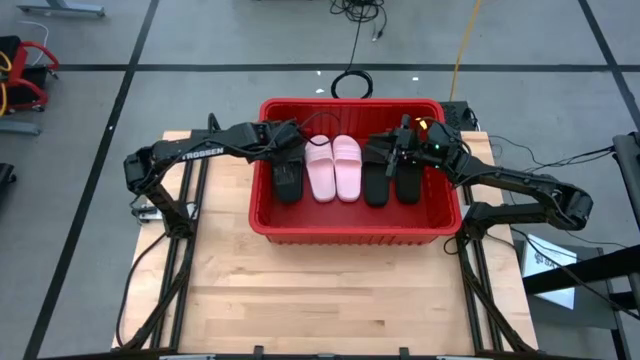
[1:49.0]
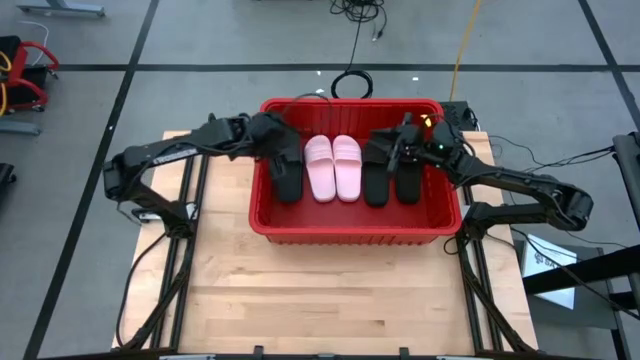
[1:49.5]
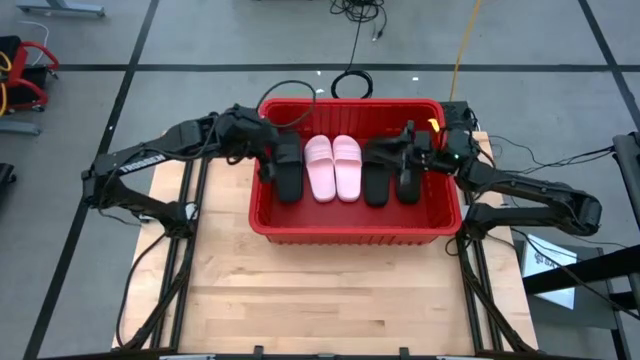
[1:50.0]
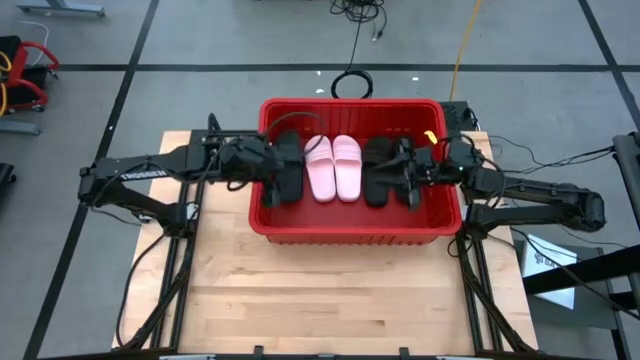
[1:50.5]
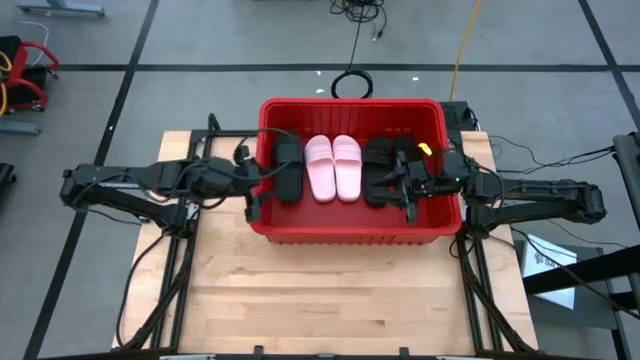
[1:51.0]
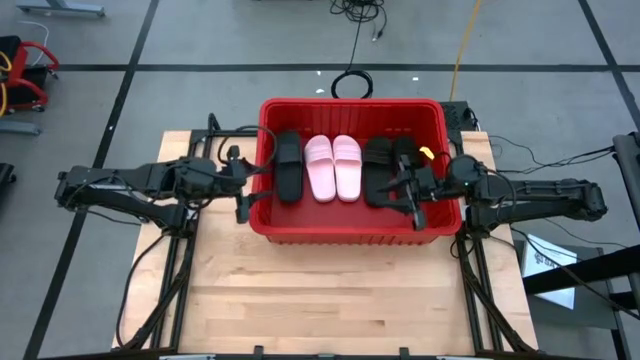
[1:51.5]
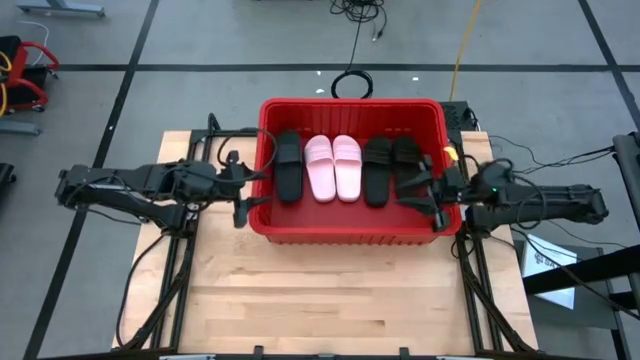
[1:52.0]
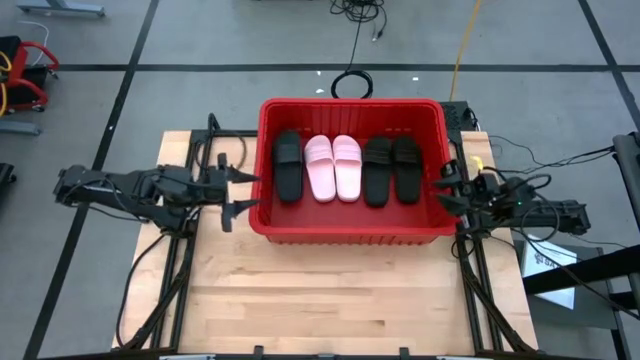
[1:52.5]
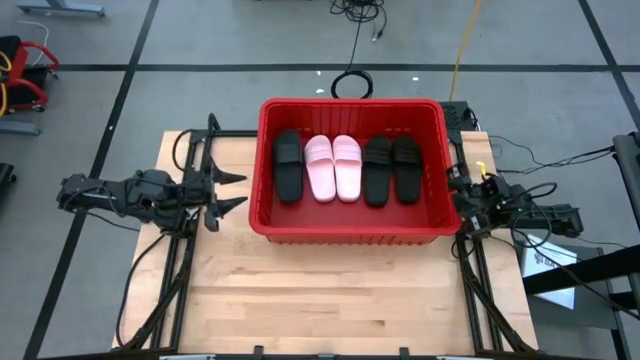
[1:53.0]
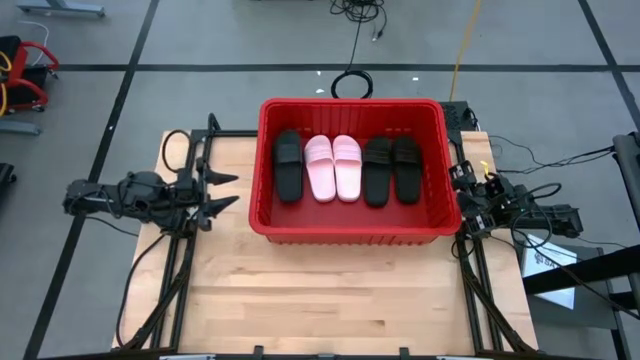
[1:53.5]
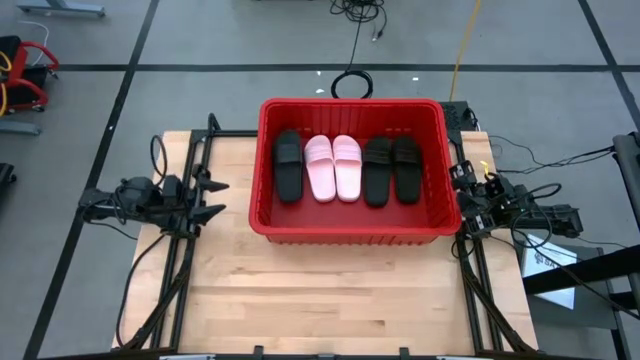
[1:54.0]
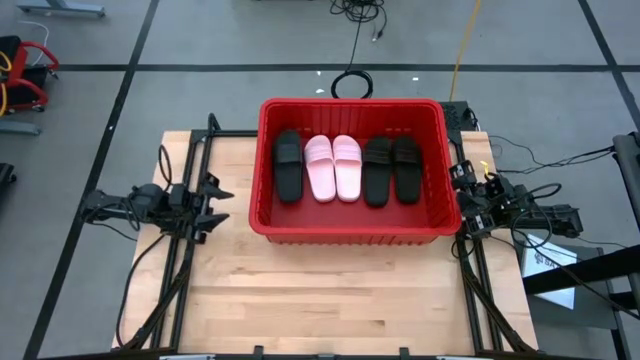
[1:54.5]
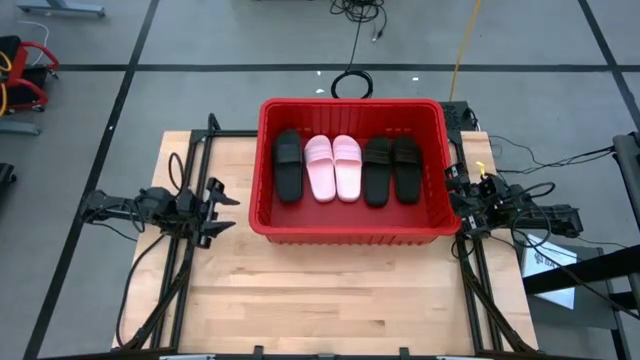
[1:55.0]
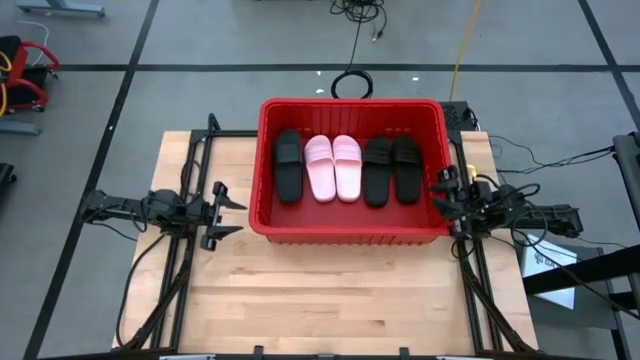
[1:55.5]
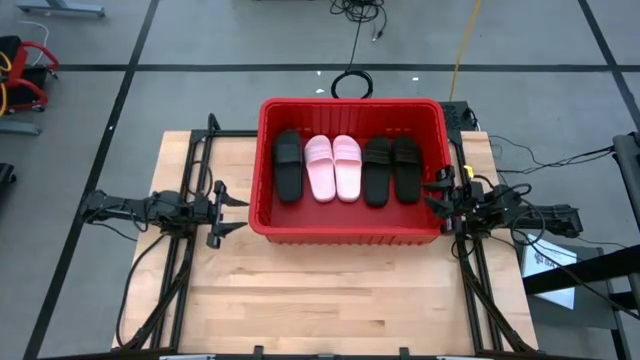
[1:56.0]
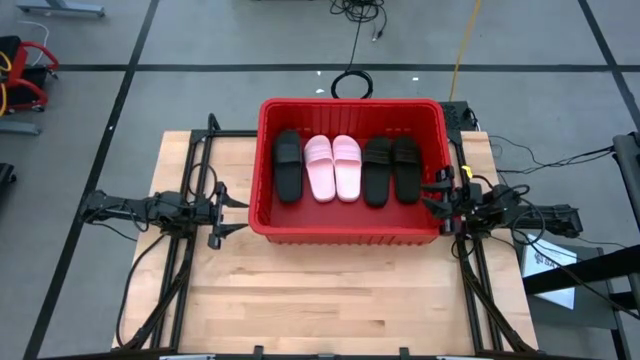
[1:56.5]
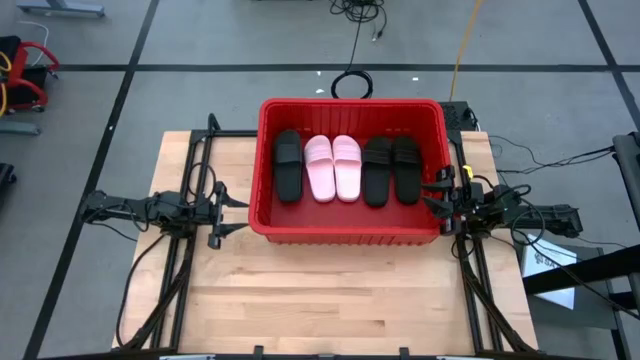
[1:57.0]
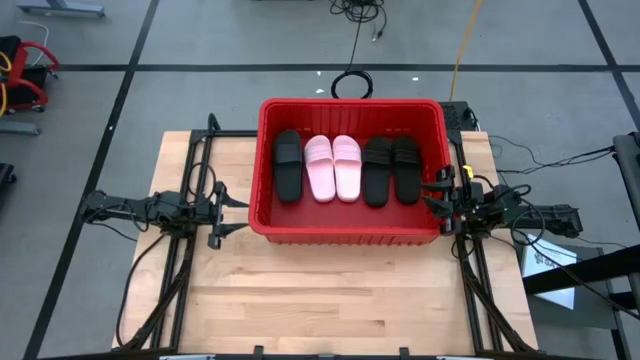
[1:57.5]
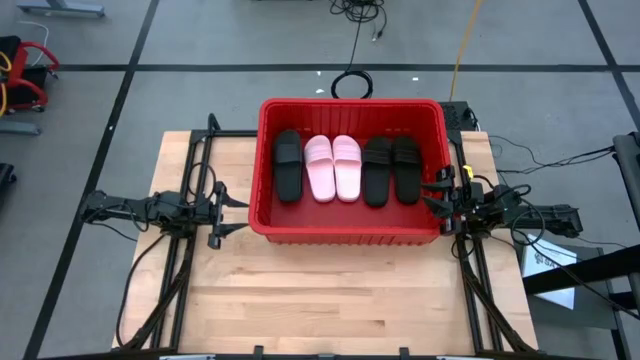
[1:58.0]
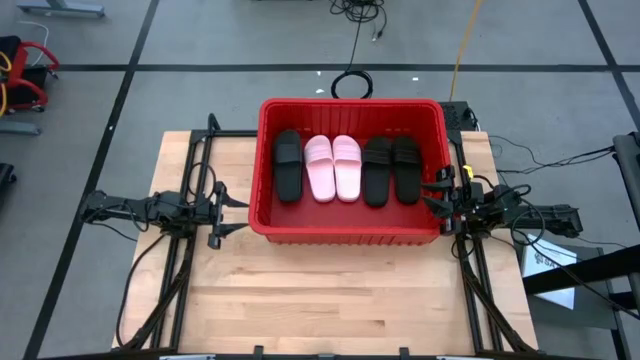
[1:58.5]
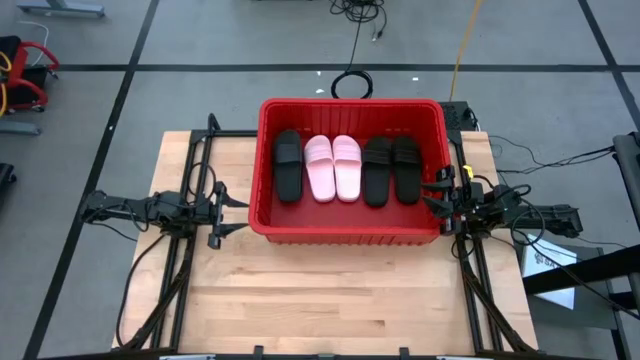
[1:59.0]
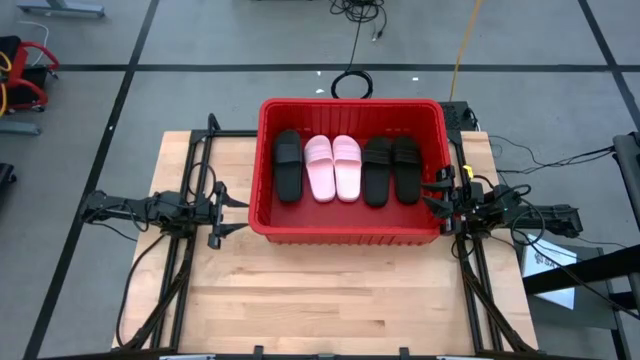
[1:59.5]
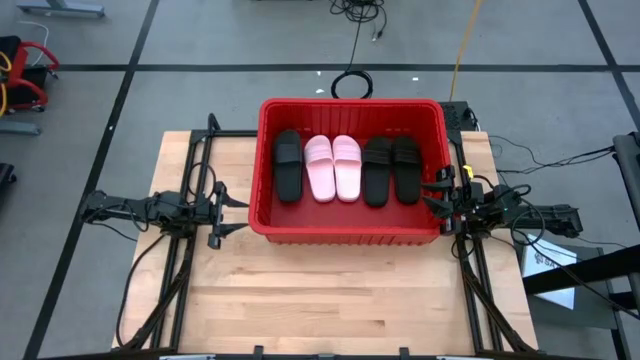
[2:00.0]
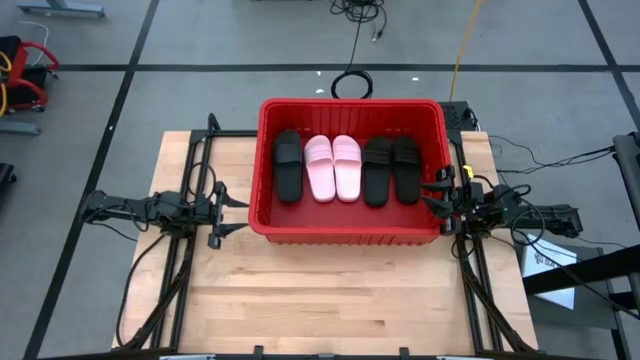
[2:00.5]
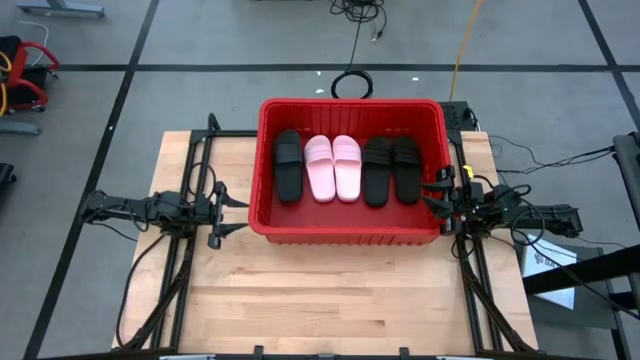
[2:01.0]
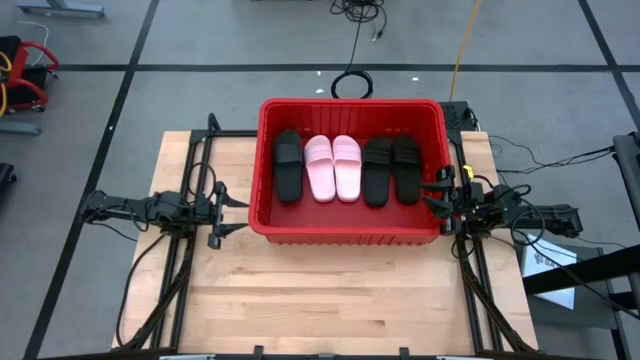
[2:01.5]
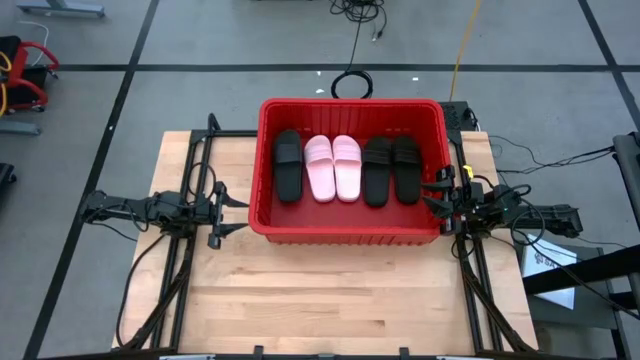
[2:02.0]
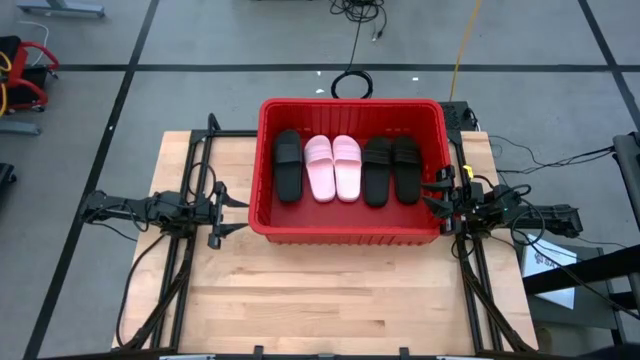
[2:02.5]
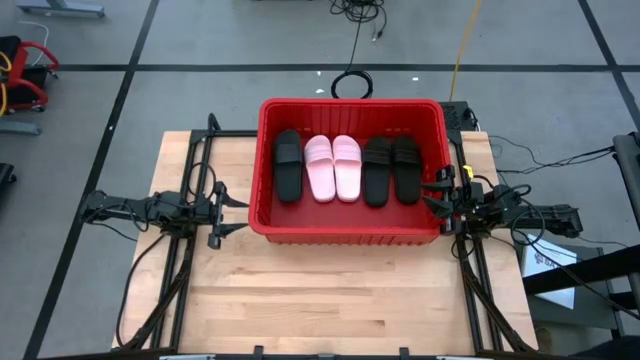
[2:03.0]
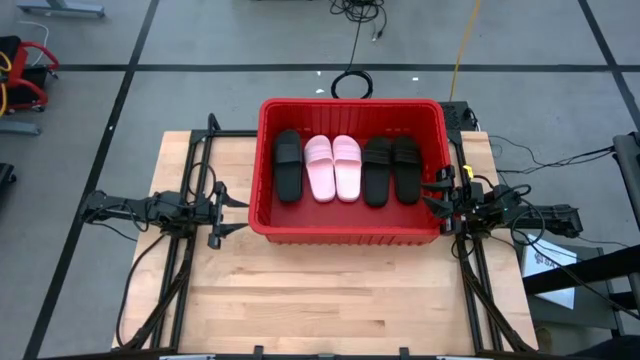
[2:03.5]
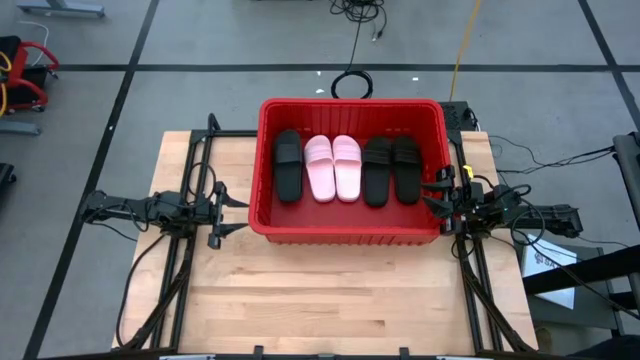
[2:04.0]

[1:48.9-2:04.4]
Task: Pick and place slides into bin
Return to Home Position
